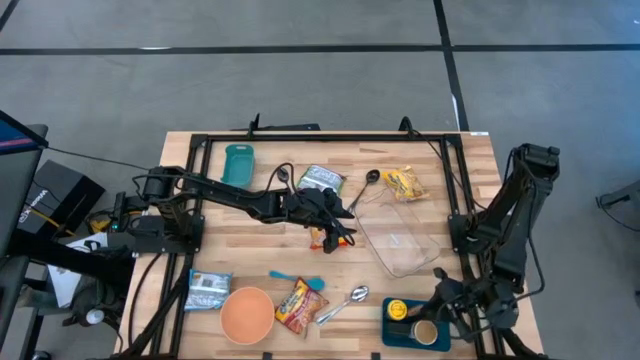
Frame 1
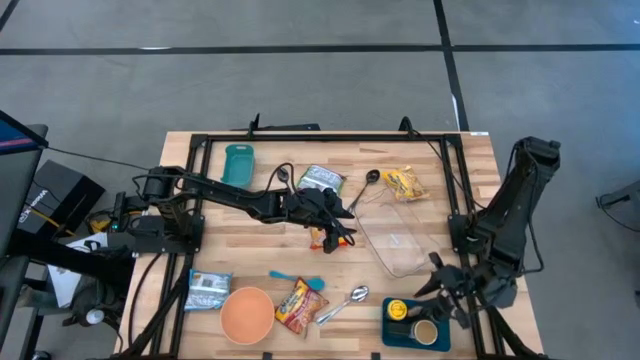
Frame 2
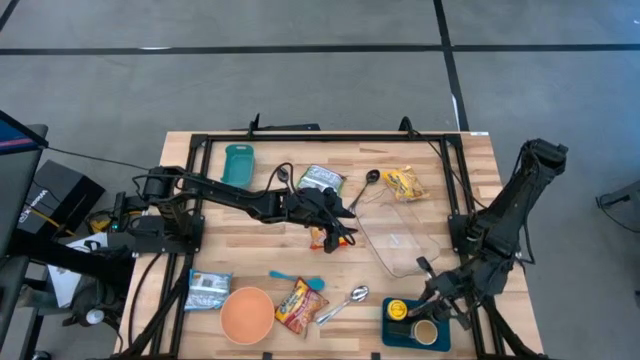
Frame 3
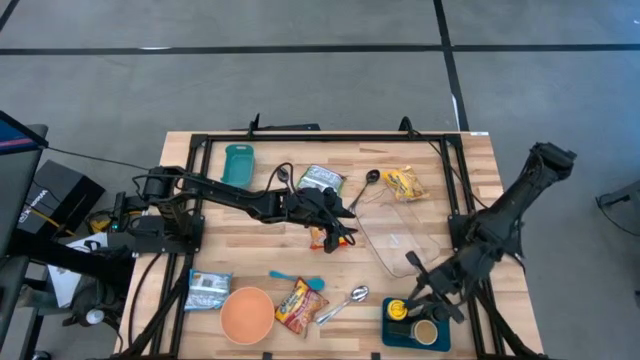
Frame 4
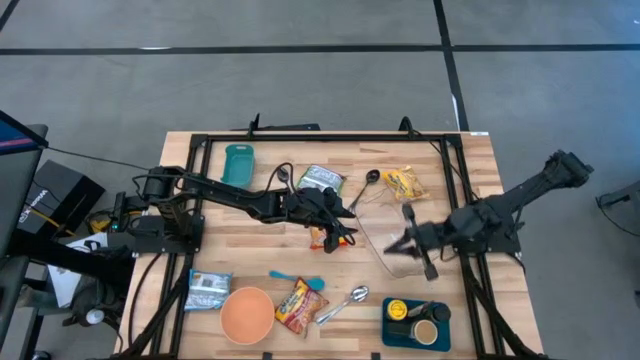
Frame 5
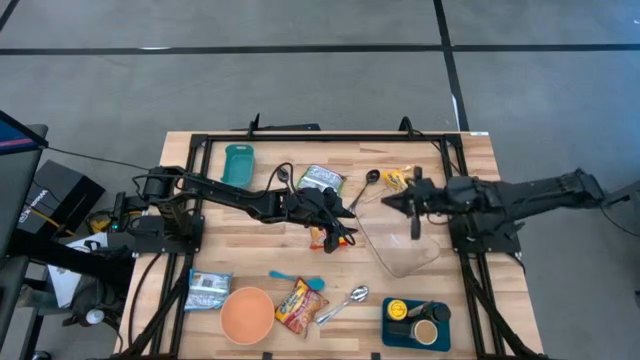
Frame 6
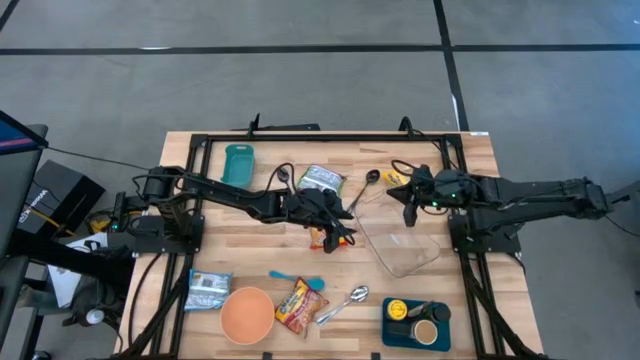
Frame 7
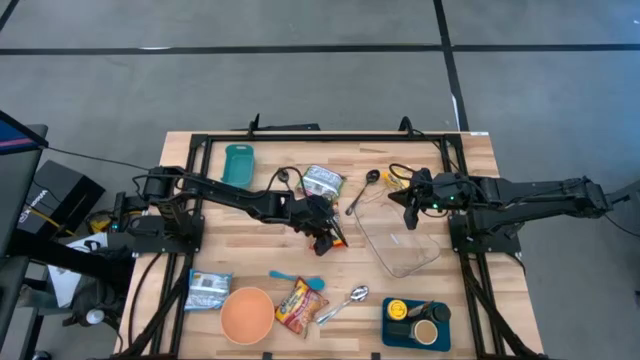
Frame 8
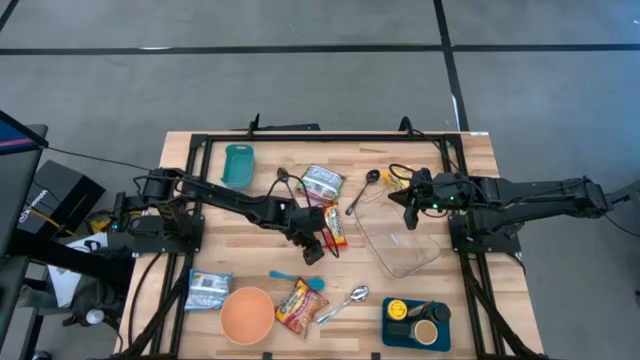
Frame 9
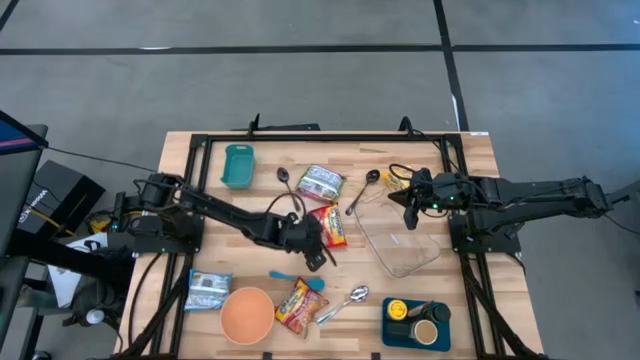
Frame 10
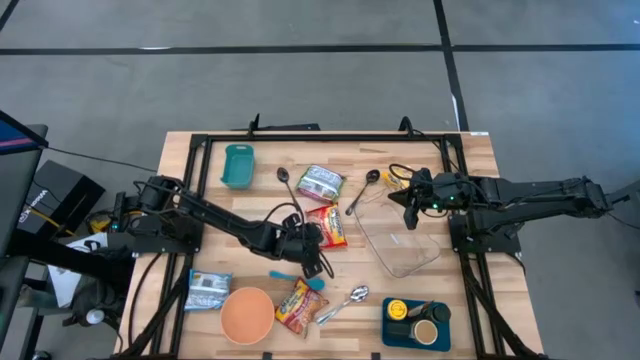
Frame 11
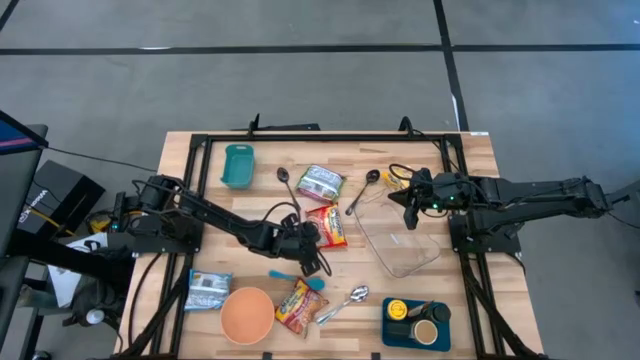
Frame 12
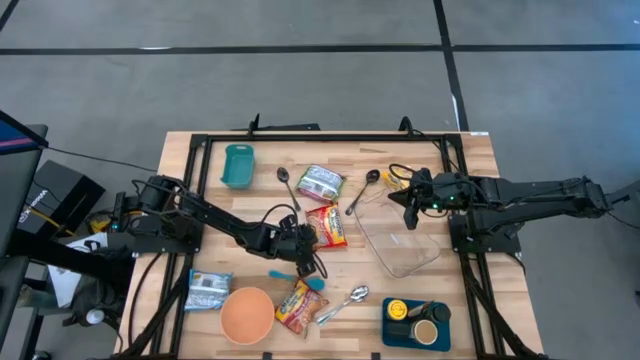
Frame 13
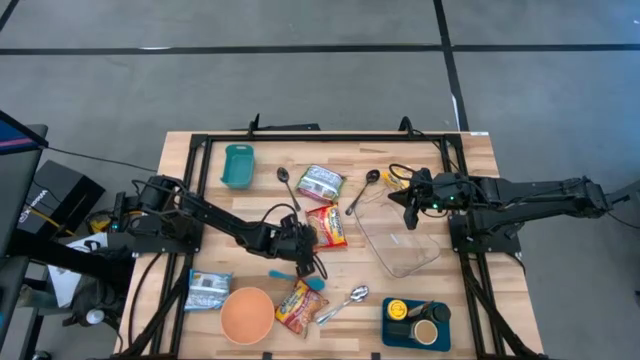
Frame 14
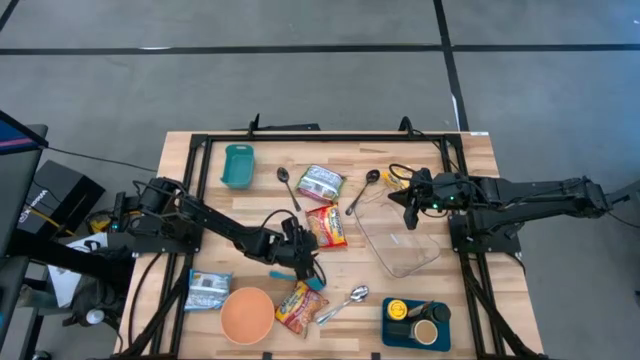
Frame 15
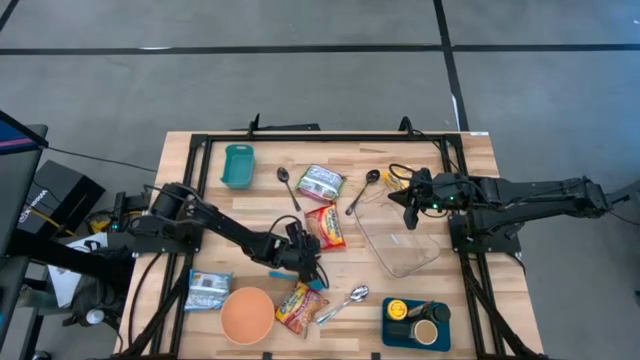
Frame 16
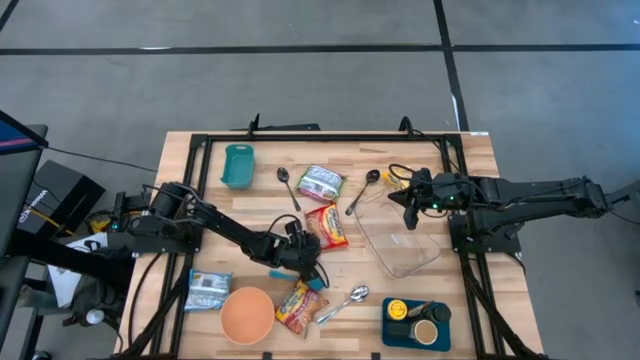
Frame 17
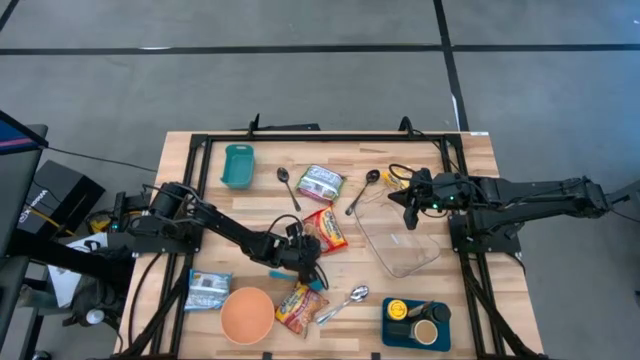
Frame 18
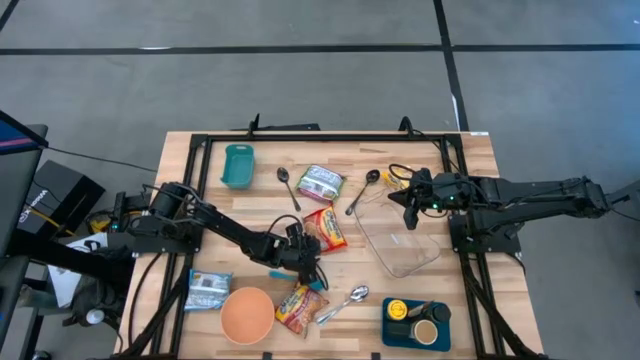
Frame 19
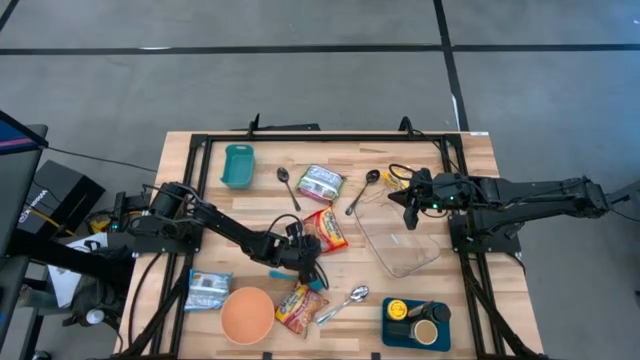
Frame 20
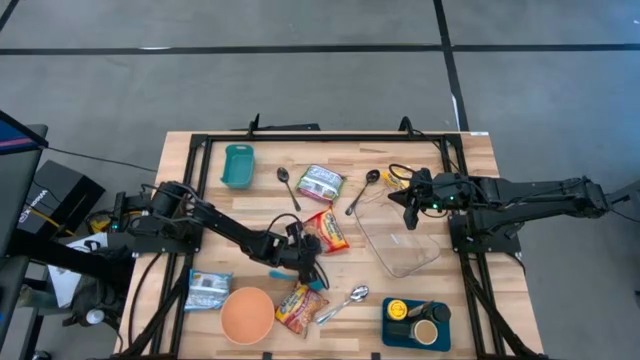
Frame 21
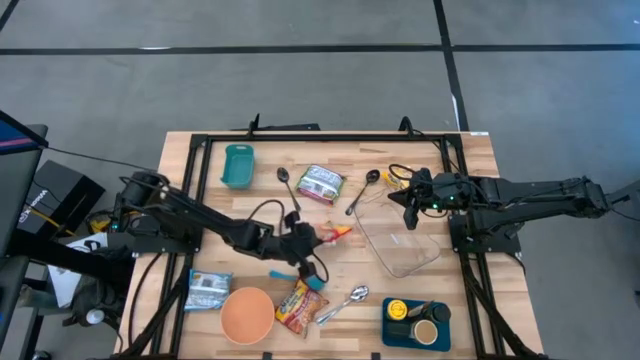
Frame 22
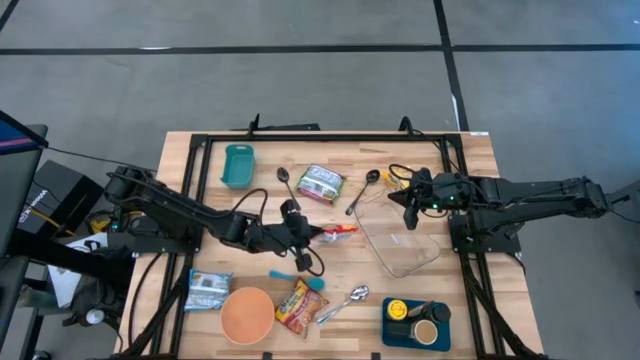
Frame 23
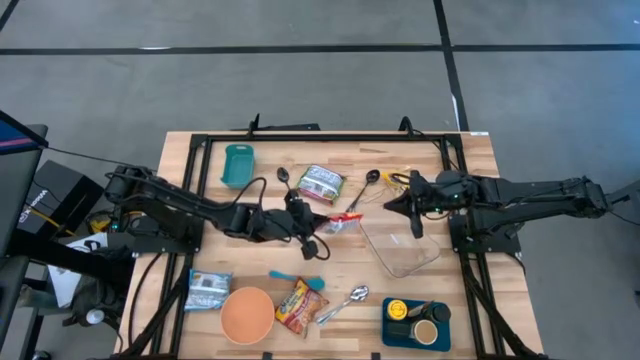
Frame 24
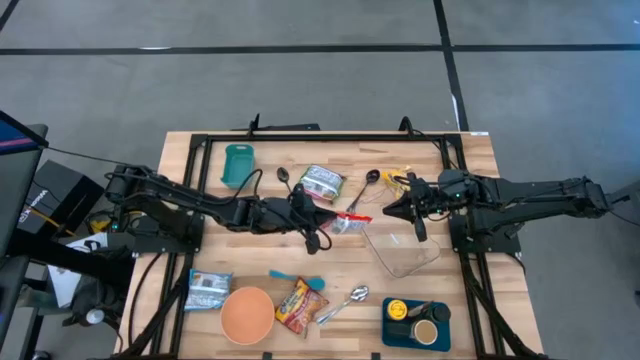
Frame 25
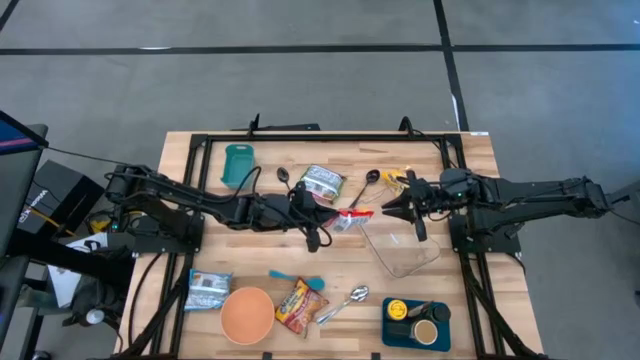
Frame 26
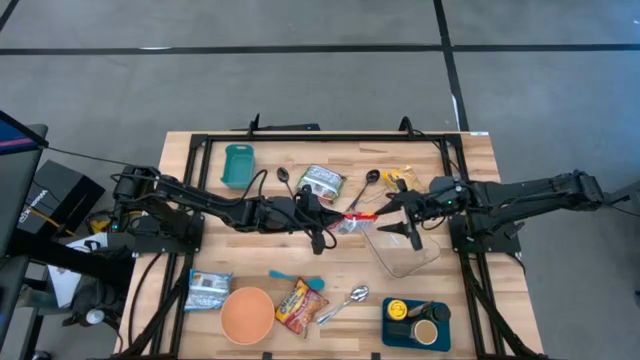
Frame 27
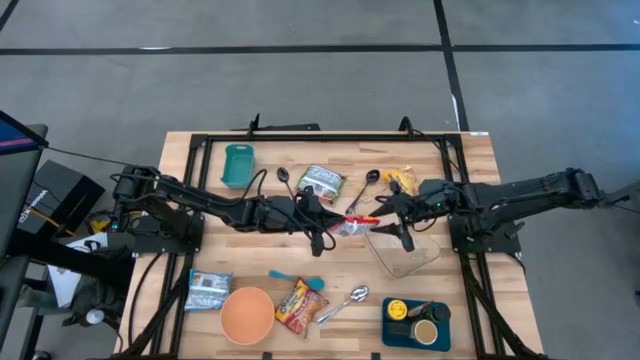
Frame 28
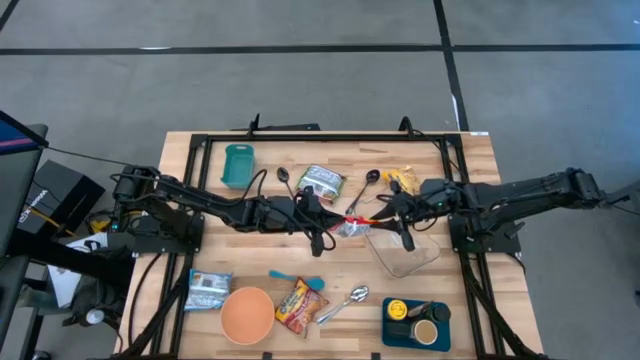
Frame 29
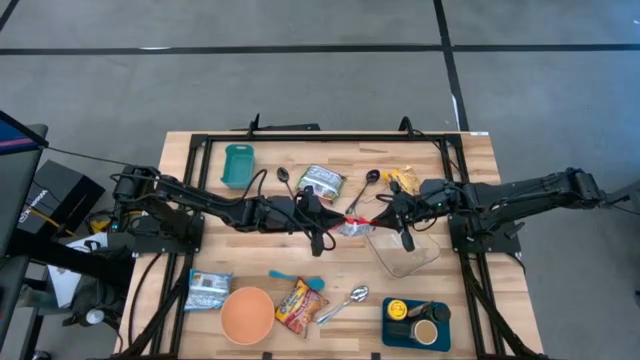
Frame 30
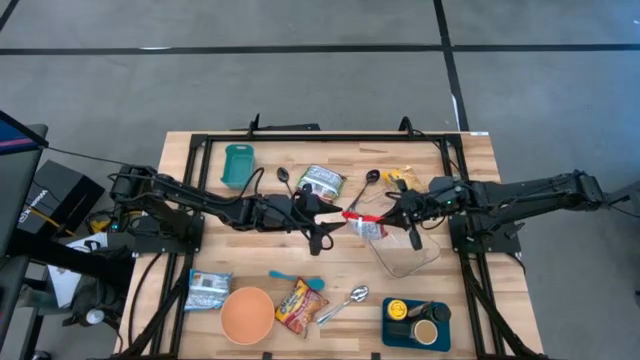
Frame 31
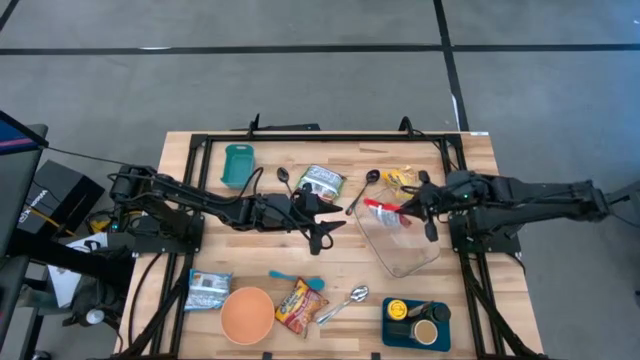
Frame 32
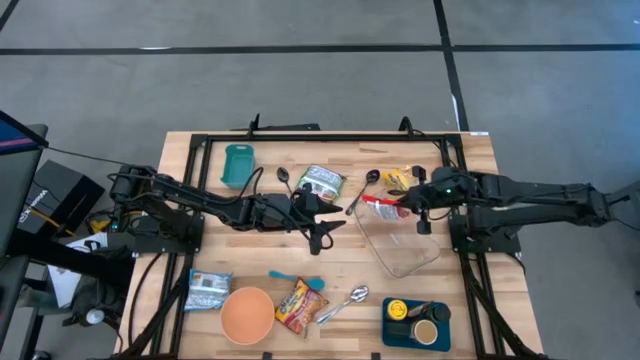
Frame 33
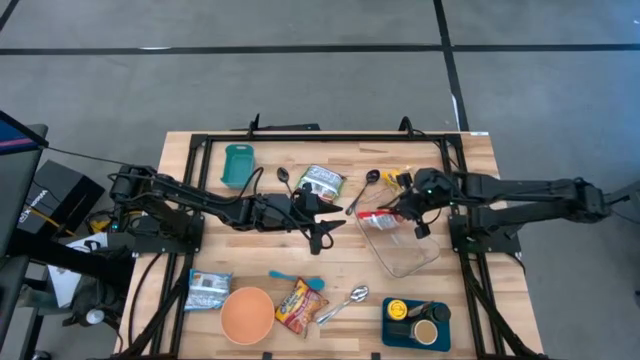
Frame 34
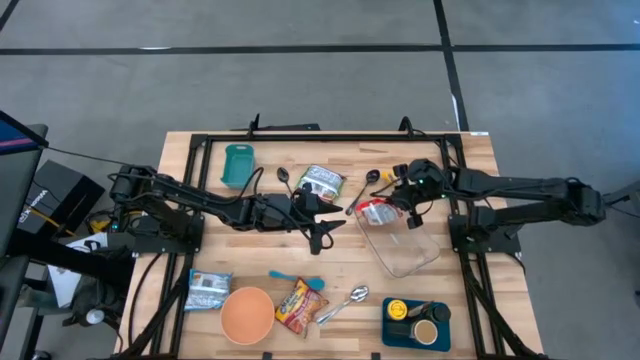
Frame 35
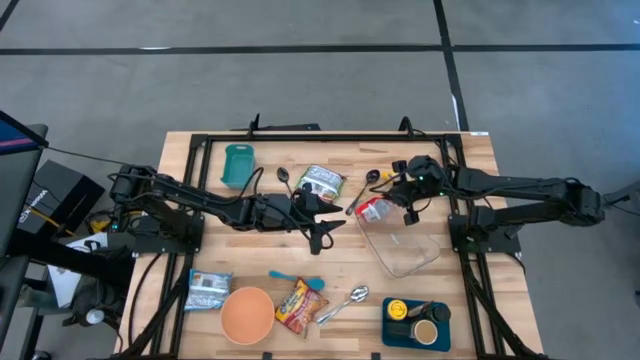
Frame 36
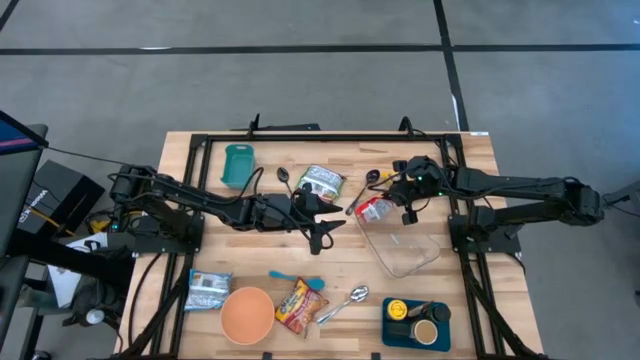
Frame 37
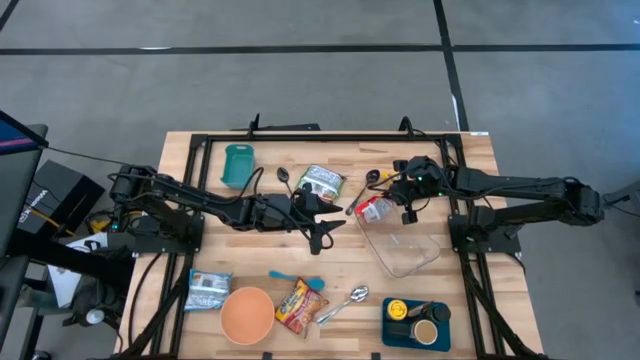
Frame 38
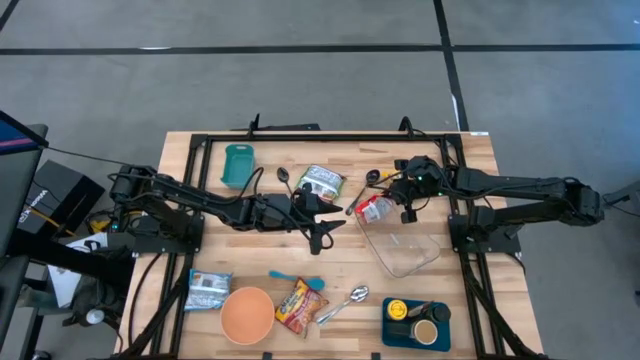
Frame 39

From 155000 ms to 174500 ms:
Task: Pick & Place Food Item
Put the orange noodle pack into the transparent bin

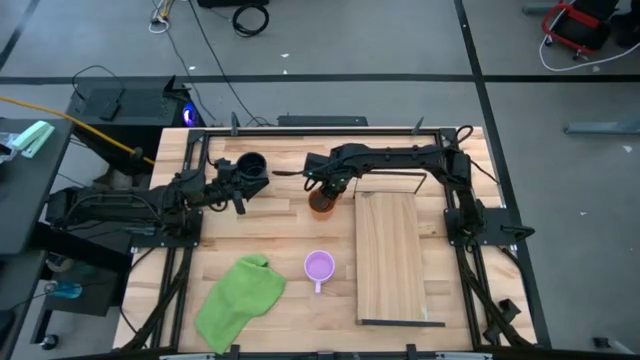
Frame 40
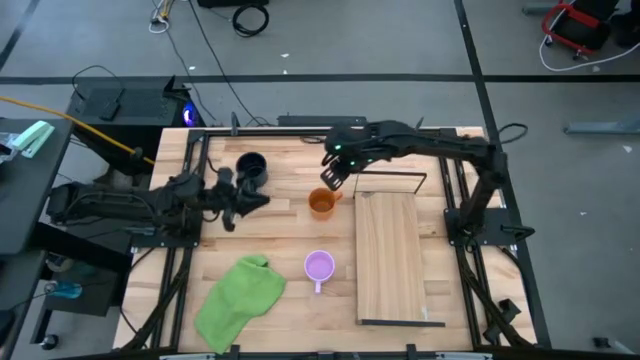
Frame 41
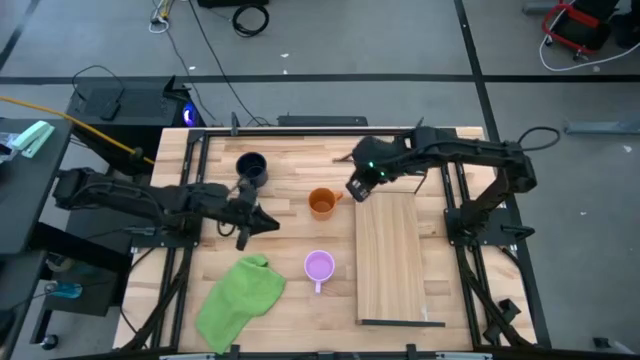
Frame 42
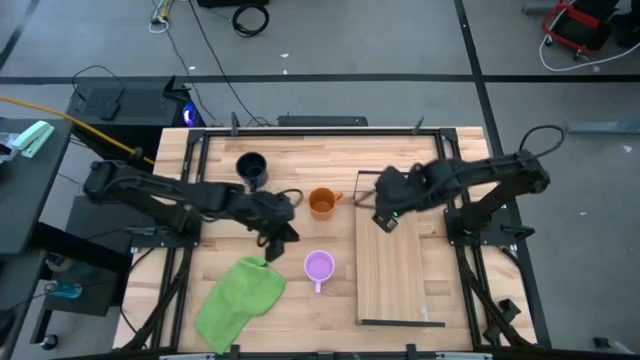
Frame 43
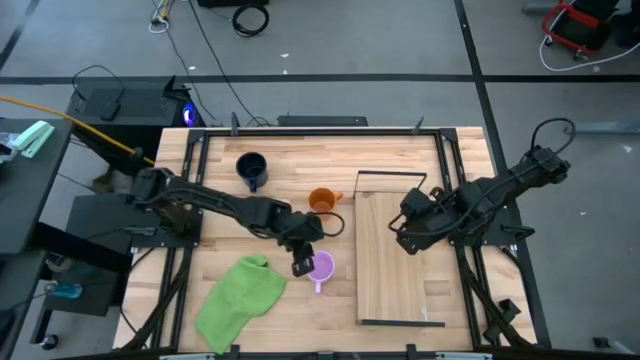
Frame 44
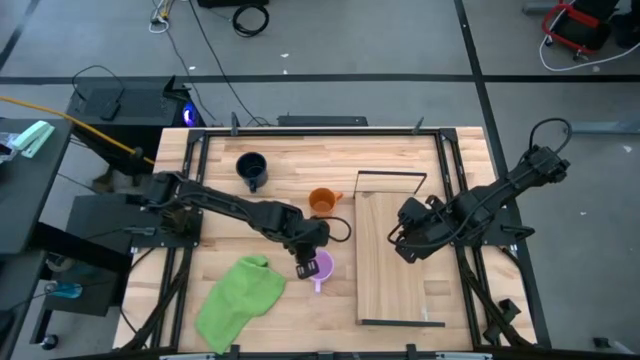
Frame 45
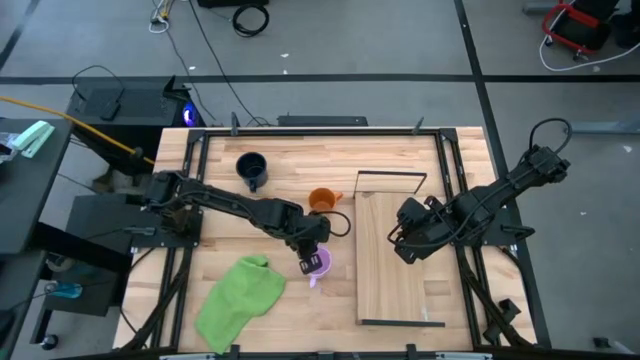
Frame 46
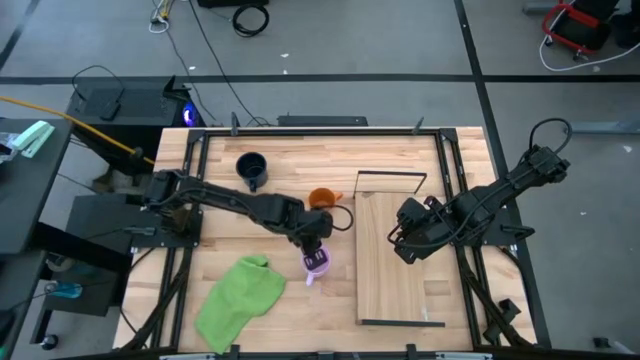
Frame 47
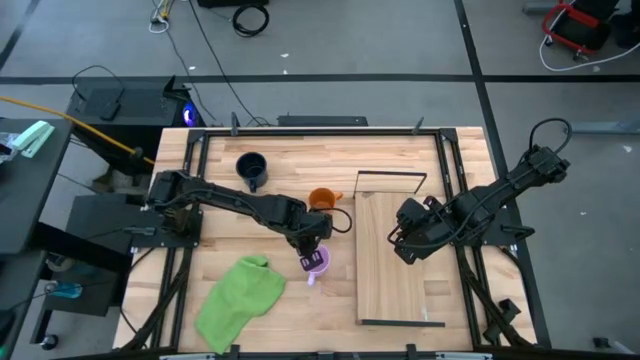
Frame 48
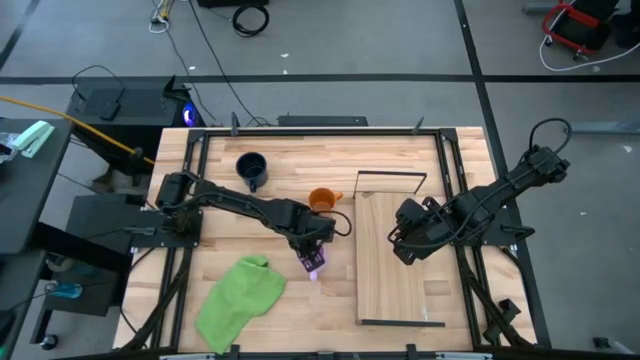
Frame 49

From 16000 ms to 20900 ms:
Task: Stack small to large cups/mugs on shelf
Put the purple mug on the shelf
